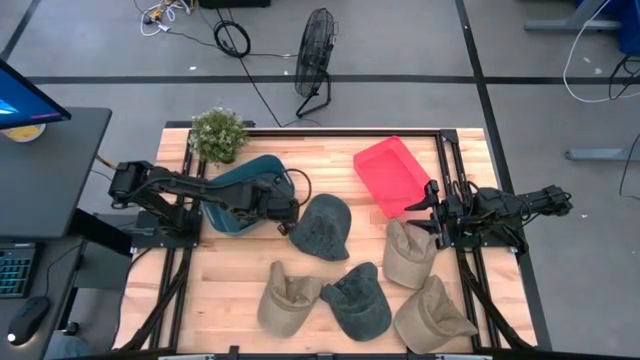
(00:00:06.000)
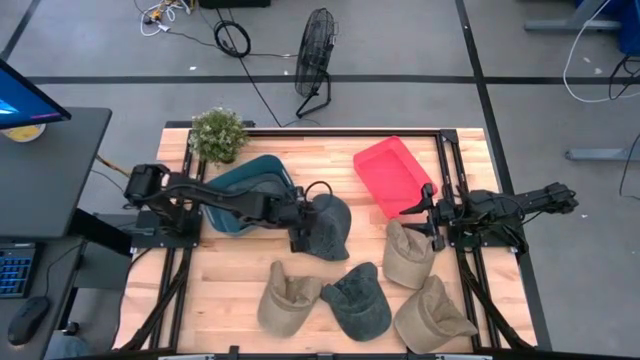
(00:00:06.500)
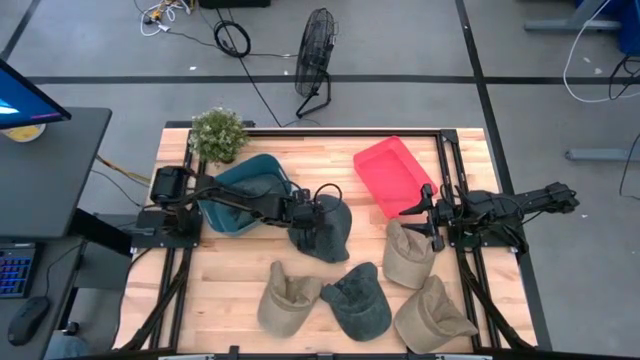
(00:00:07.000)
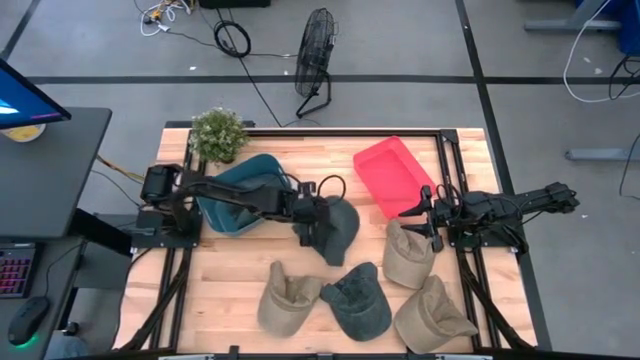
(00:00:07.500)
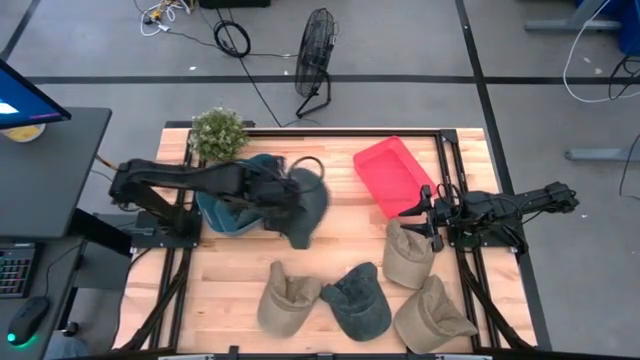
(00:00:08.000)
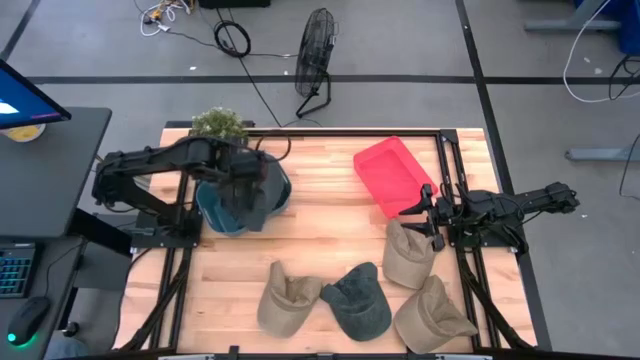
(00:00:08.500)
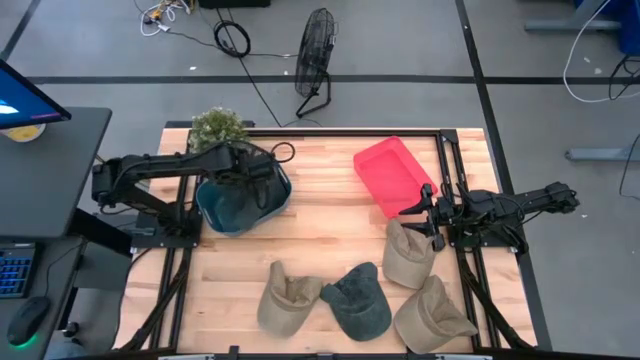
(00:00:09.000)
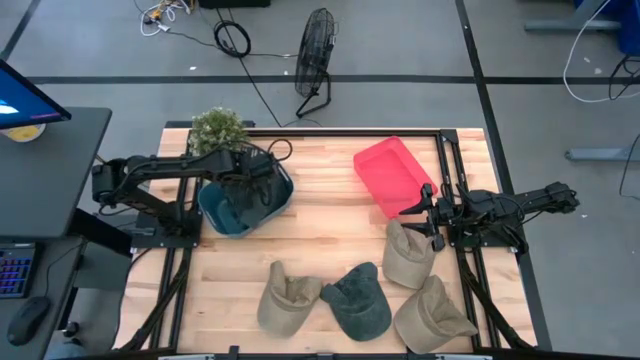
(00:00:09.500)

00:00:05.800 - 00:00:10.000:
Task: Pick & Place hat
Put the top black cap into the blue bin

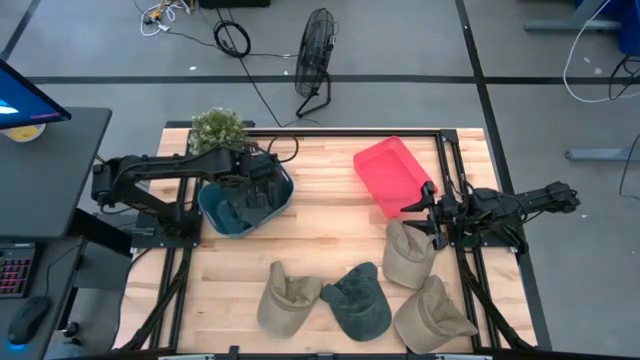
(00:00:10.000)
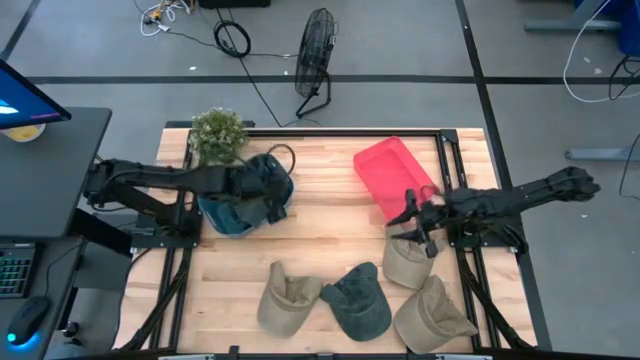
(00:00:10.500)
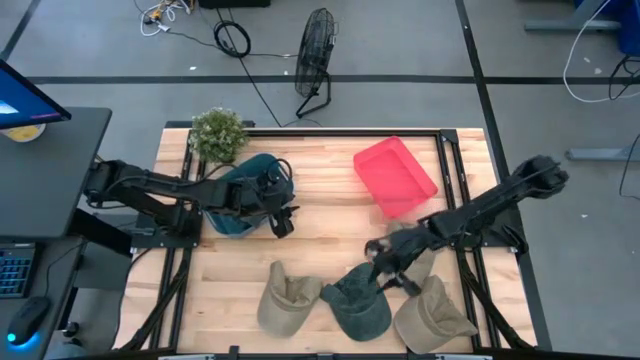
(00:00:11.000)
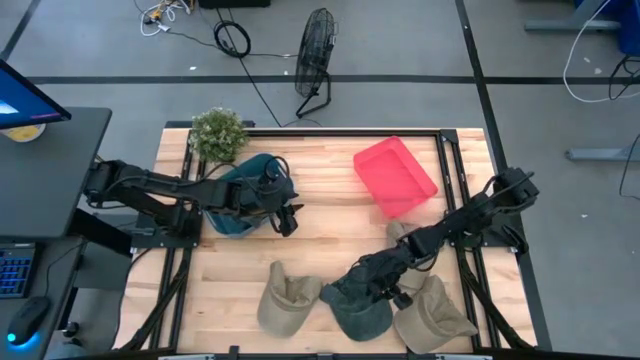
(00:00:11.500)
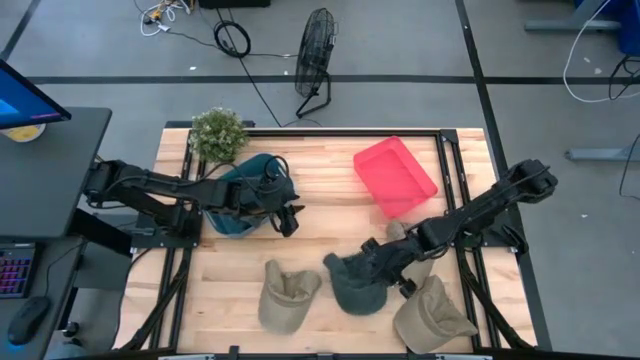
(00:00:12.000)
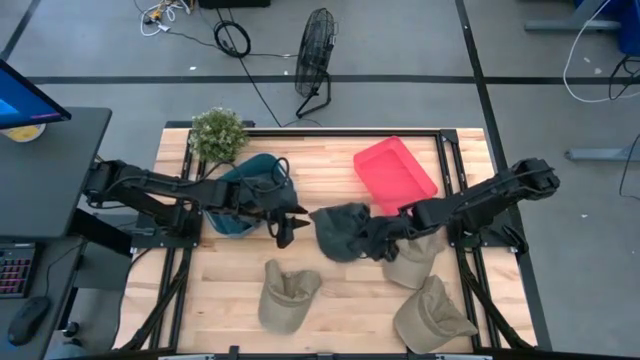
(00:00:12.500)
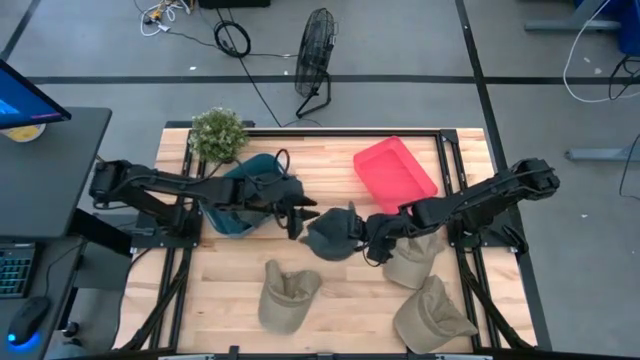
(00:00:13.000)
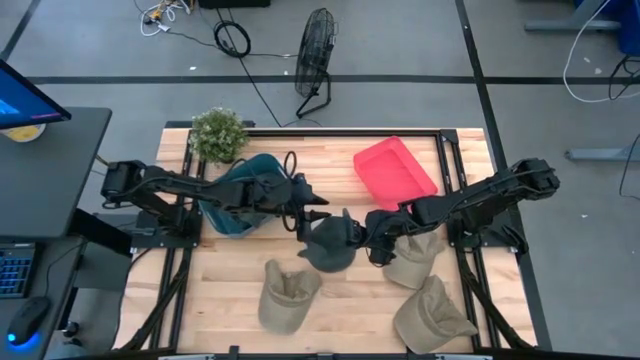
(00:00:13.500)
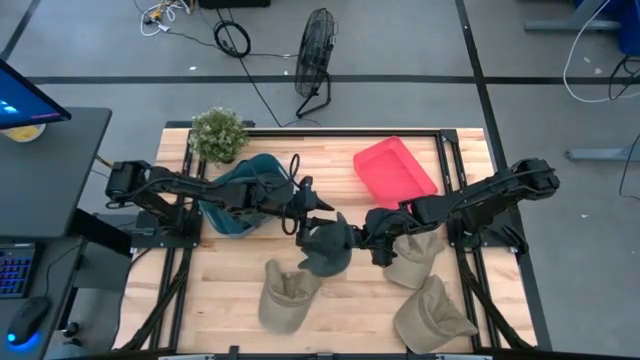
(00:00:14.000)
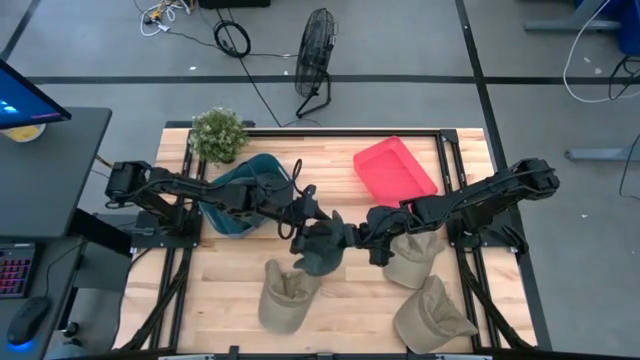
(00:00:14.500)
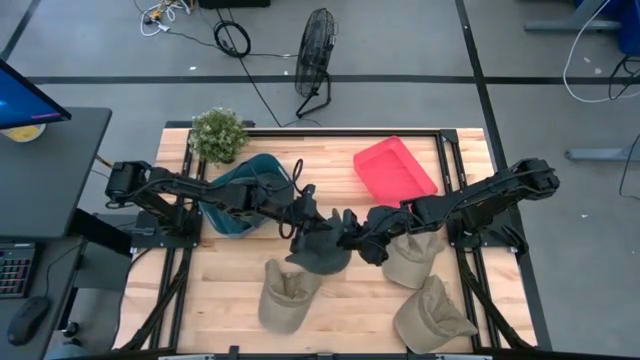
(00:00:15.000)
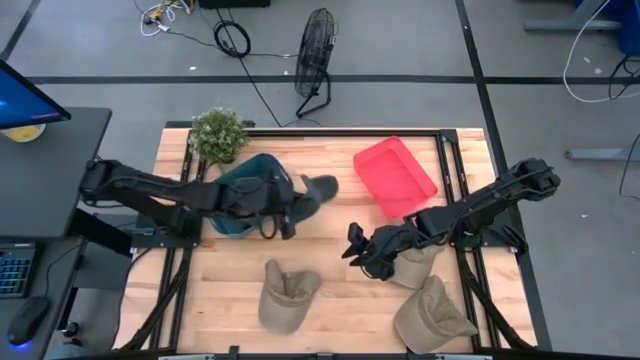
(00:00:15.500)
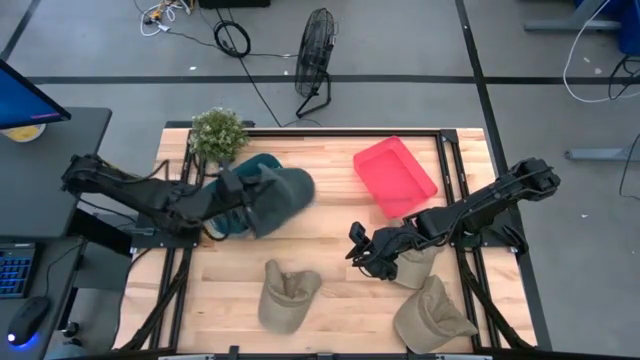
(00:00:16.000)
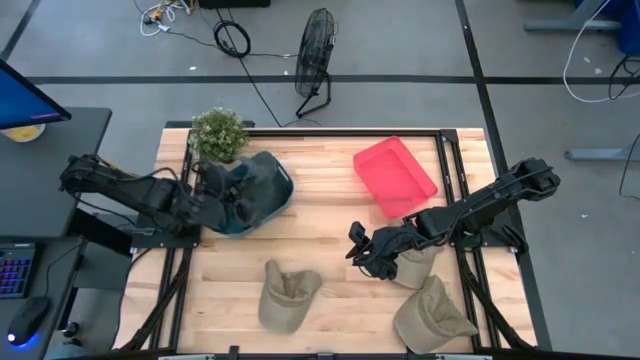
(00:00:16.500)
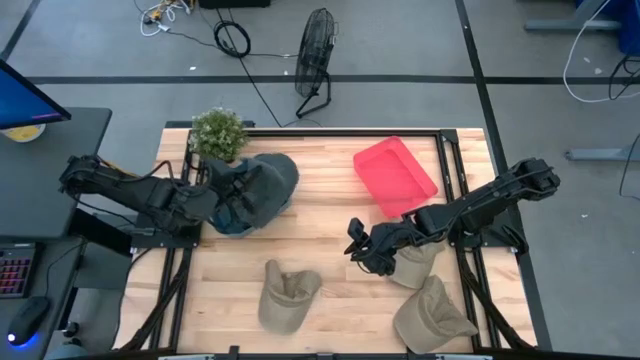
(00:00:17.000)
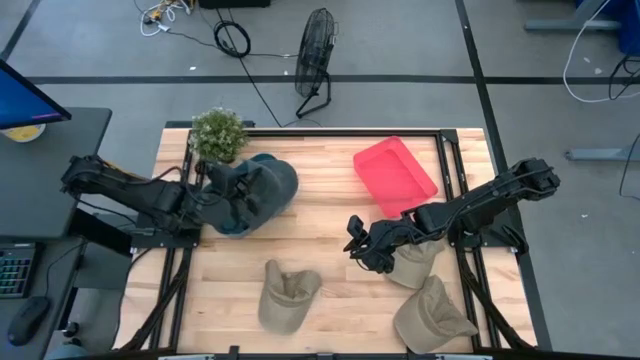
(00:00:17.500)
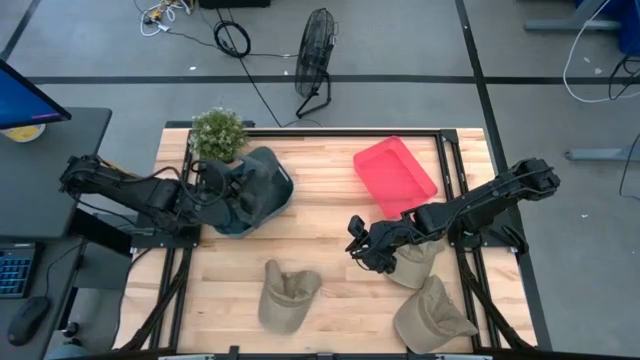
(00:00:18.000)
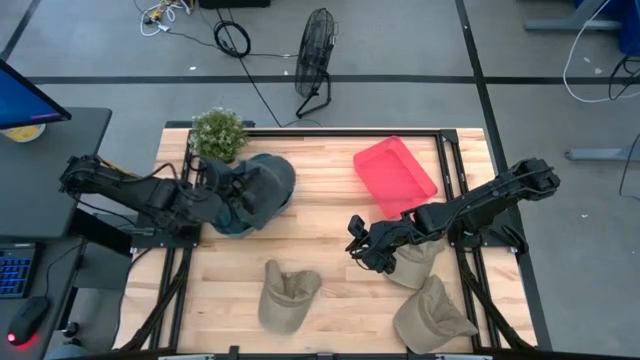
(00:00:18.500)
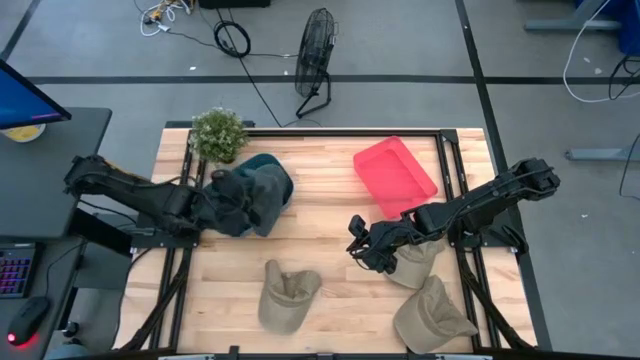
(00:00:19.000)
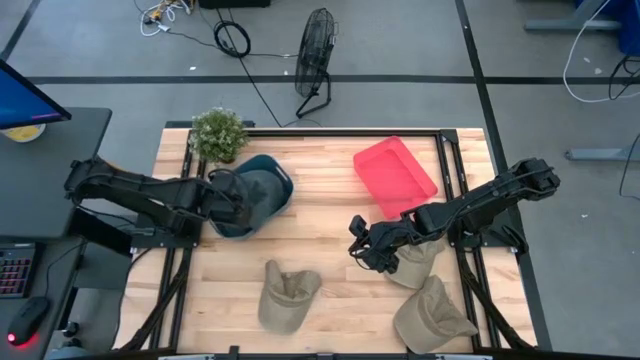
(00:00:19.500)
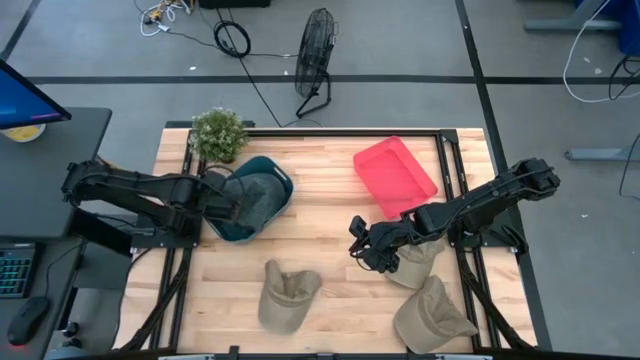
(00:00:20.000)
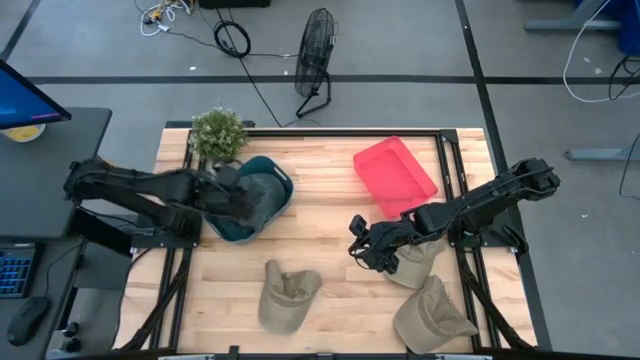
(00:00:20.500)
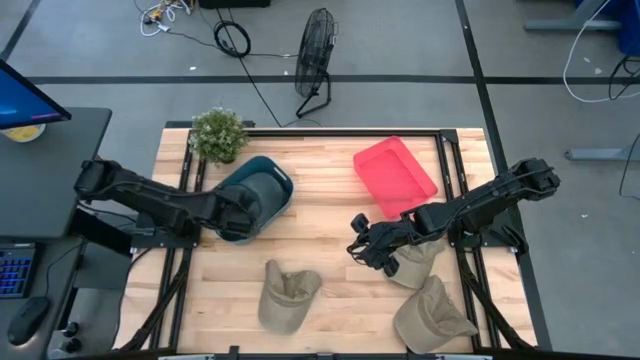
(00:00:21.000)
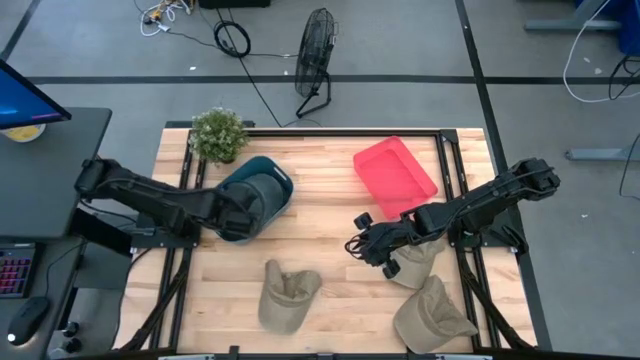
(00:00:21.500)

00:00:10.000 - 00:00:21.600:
Put the black cap into the blue bin

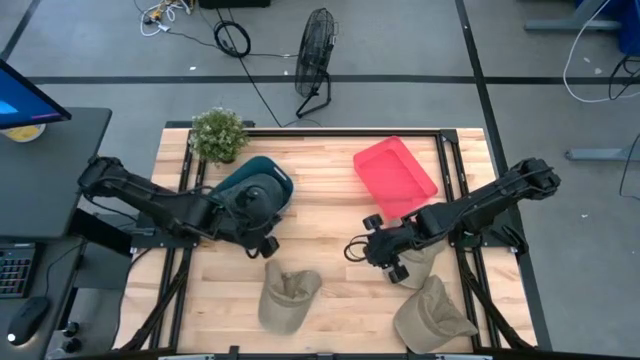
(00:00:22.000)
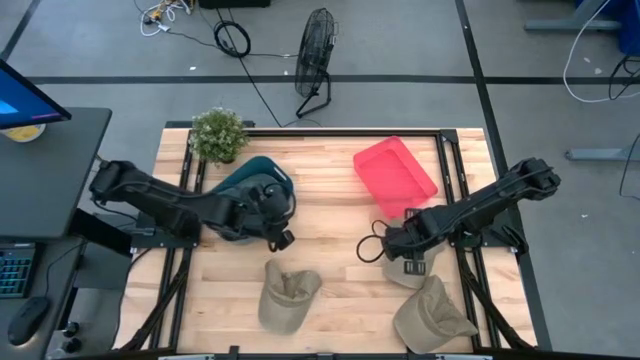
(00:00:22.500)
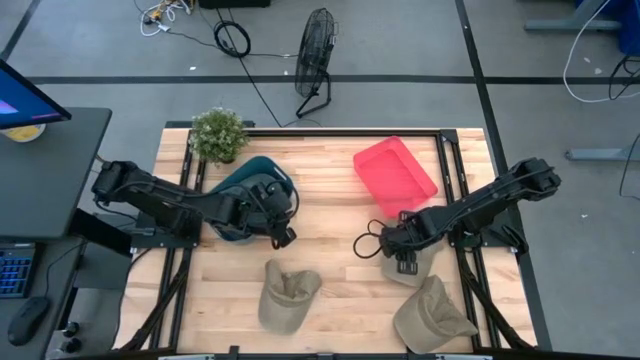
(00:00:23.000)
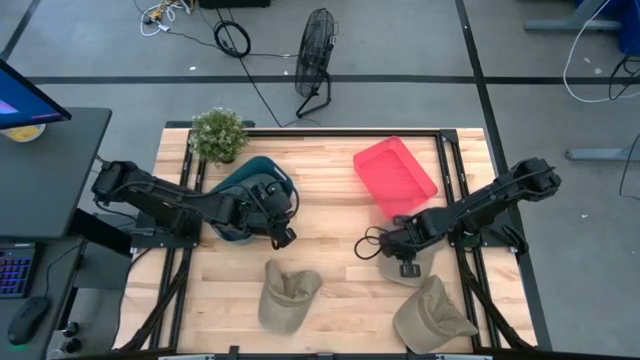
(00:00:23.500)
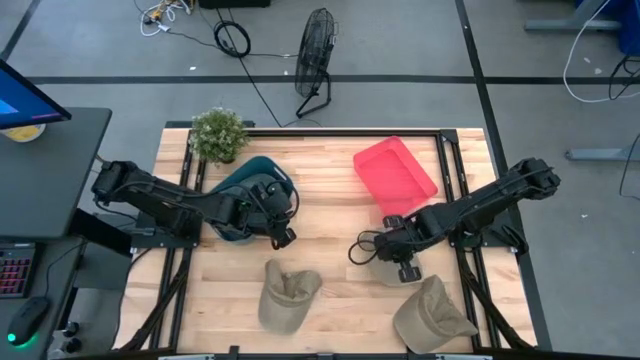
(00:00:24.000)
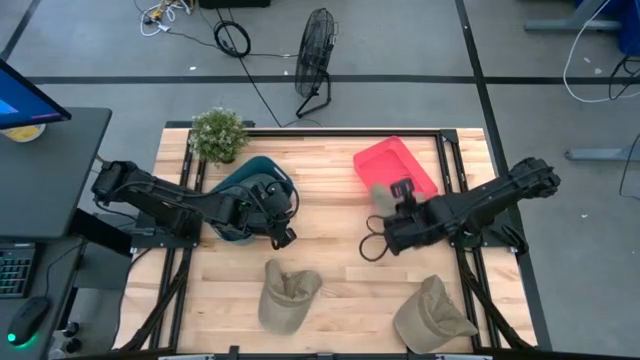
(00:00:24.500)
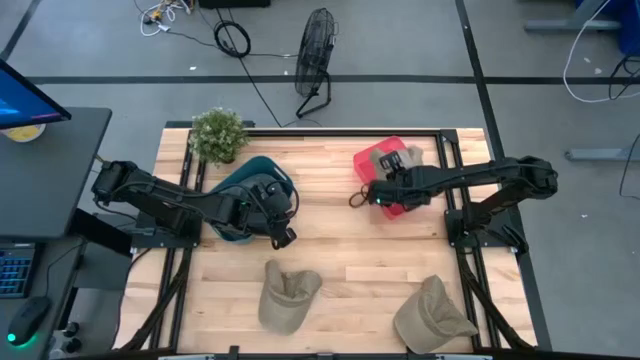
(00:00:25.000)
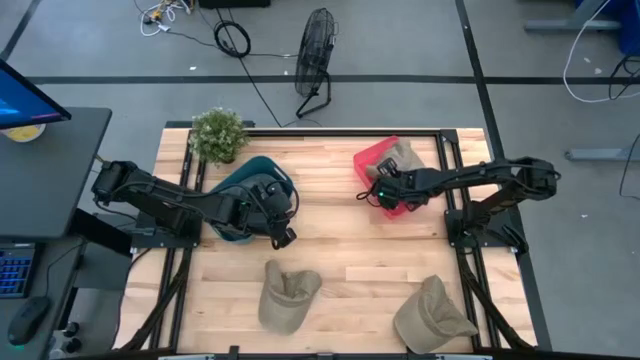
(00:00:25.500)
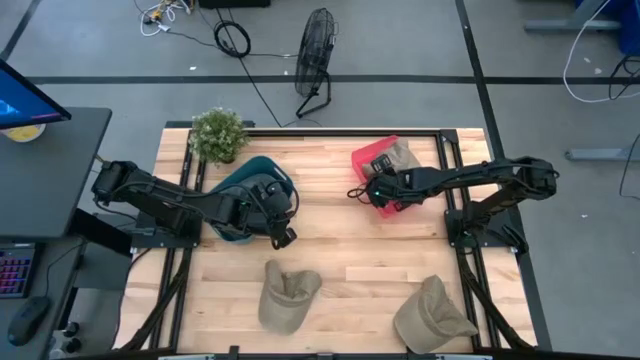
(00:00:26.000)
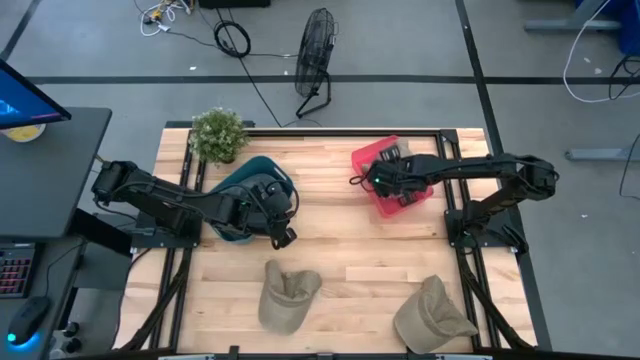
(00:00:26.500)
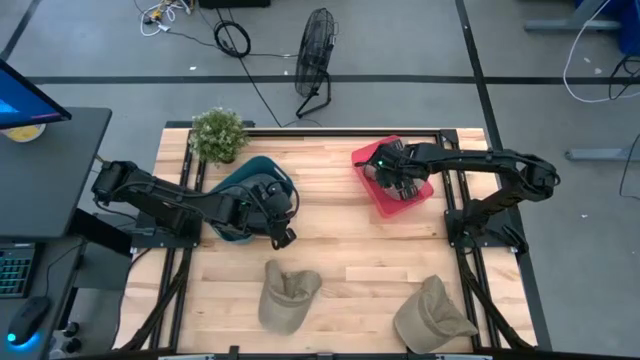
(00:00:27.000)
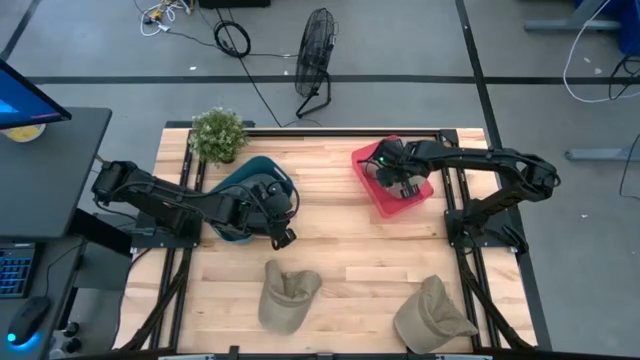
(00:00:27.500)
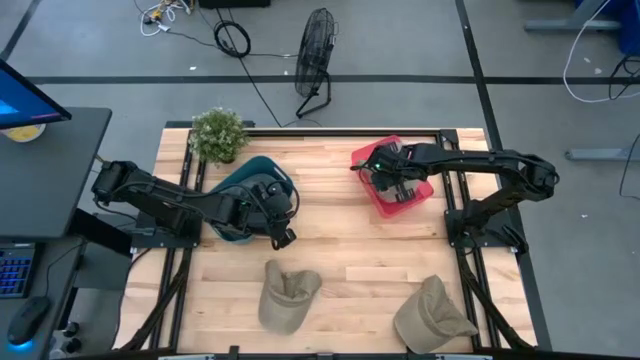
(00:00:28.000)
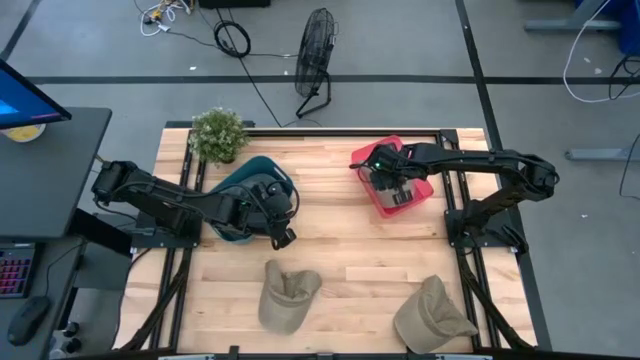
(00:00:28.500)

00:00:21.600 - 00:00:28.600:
Put the top brown cap into the red bin
